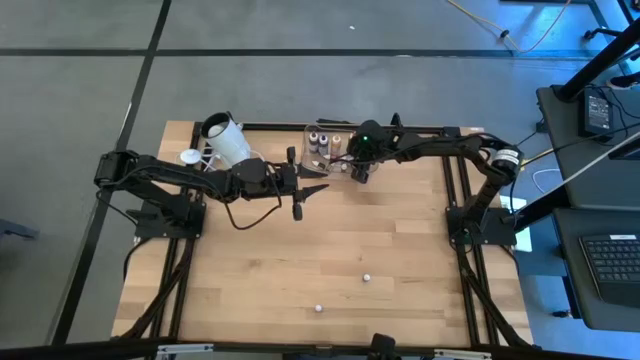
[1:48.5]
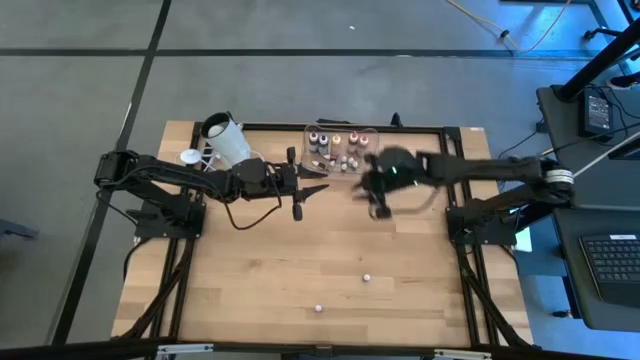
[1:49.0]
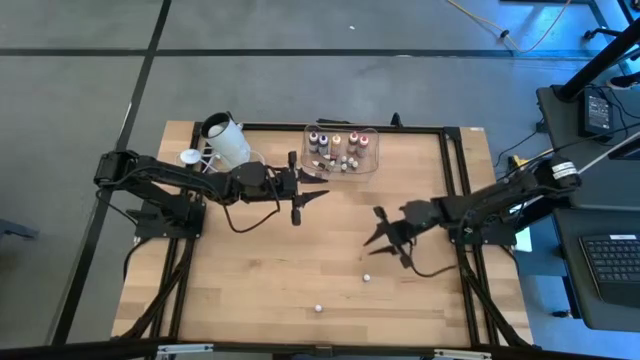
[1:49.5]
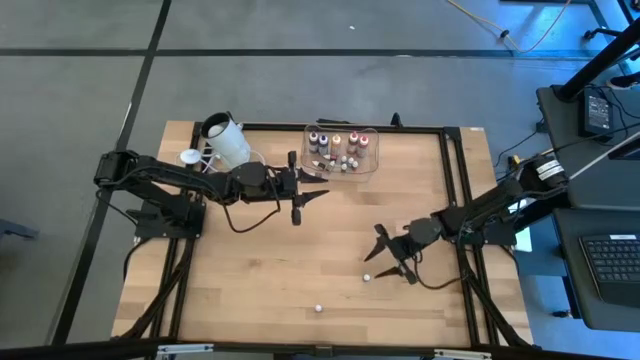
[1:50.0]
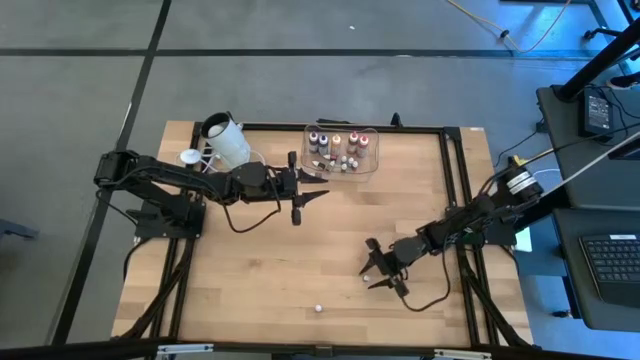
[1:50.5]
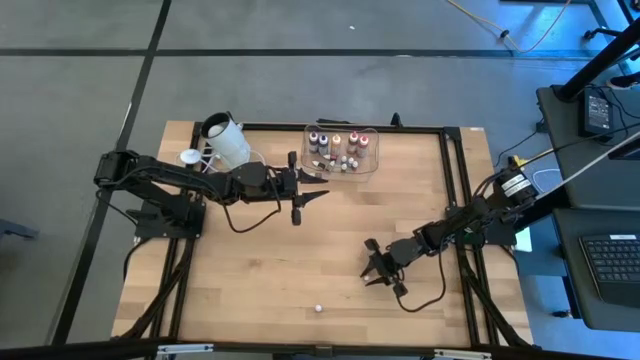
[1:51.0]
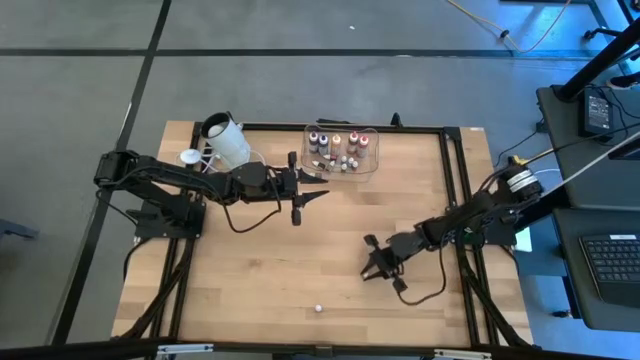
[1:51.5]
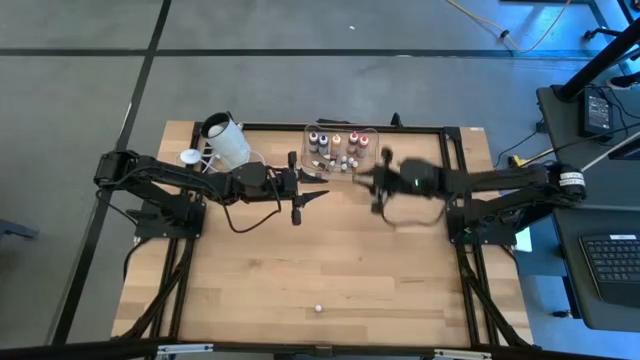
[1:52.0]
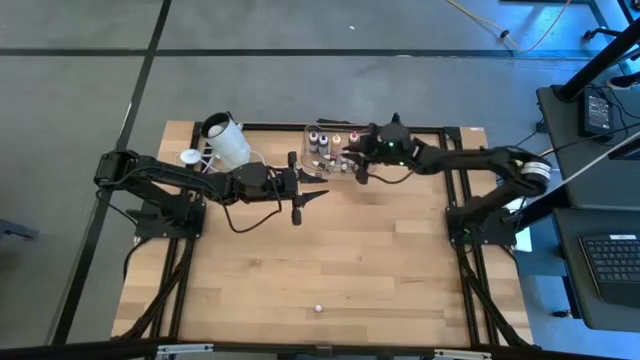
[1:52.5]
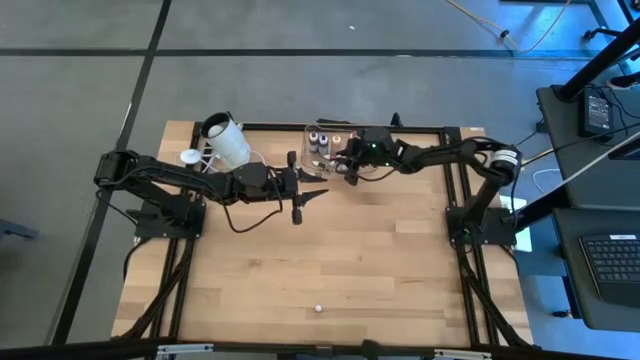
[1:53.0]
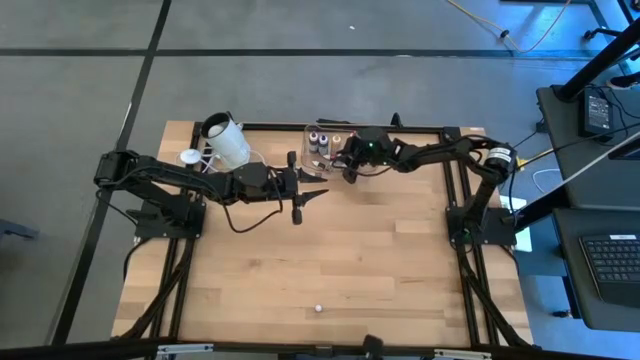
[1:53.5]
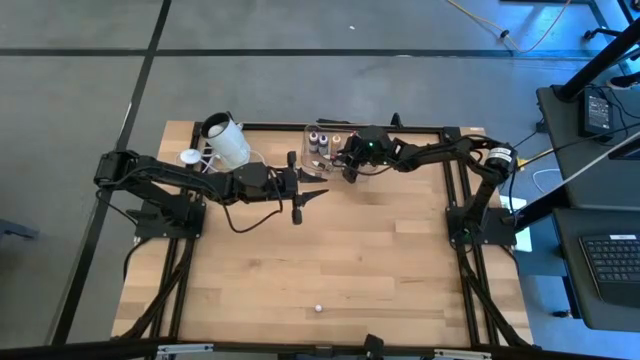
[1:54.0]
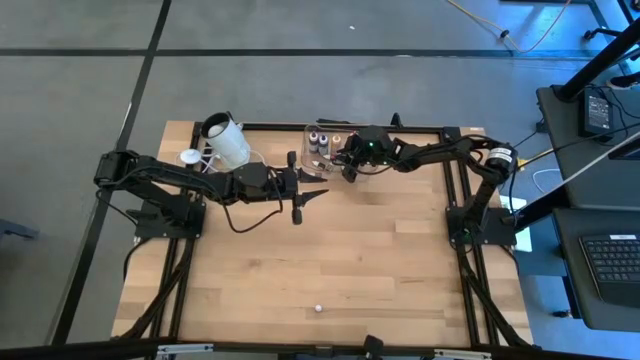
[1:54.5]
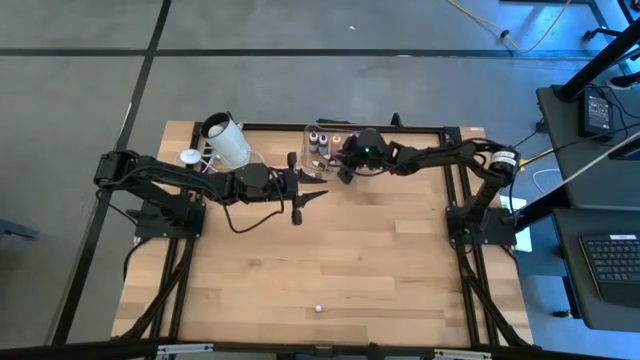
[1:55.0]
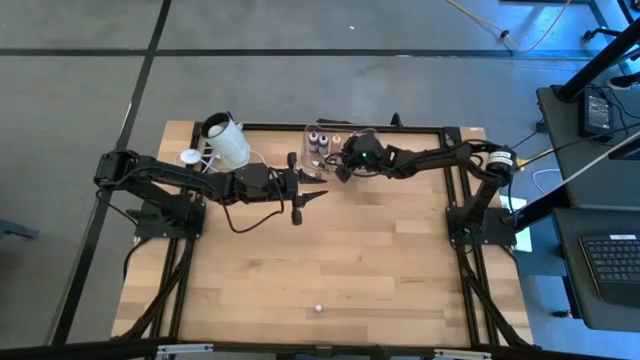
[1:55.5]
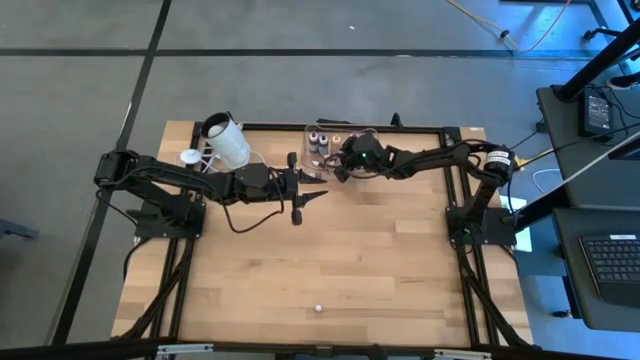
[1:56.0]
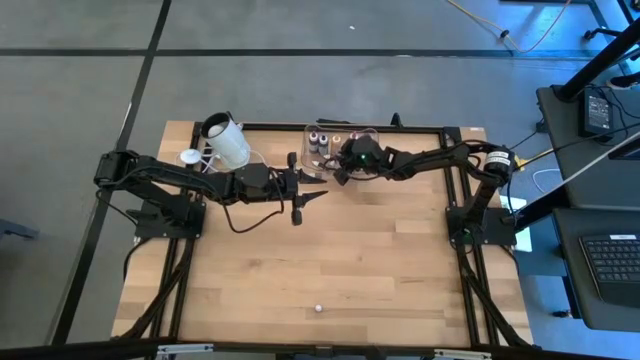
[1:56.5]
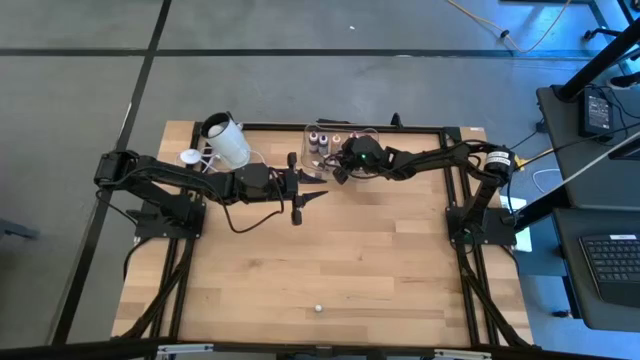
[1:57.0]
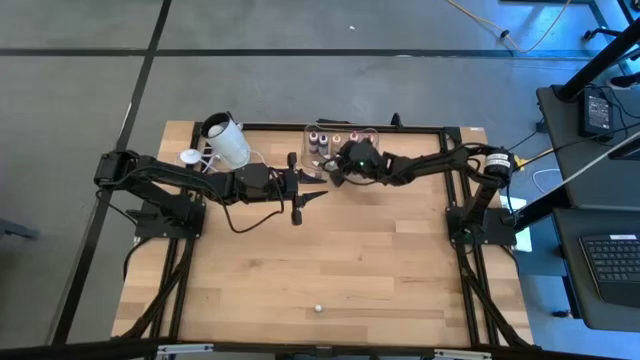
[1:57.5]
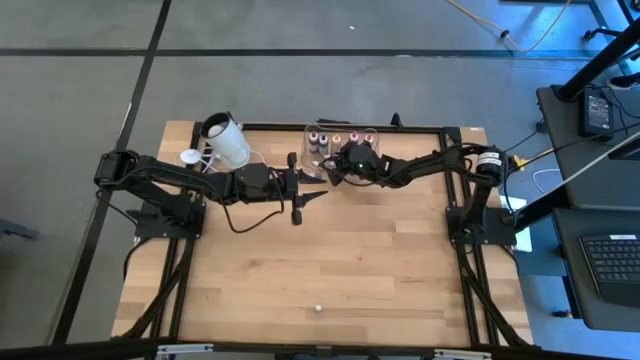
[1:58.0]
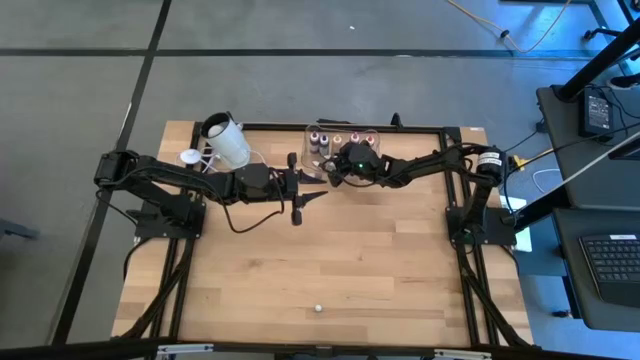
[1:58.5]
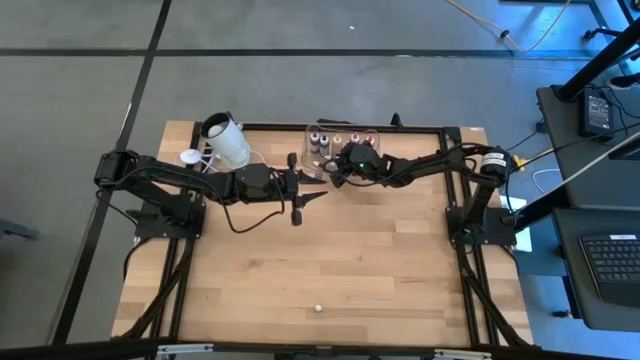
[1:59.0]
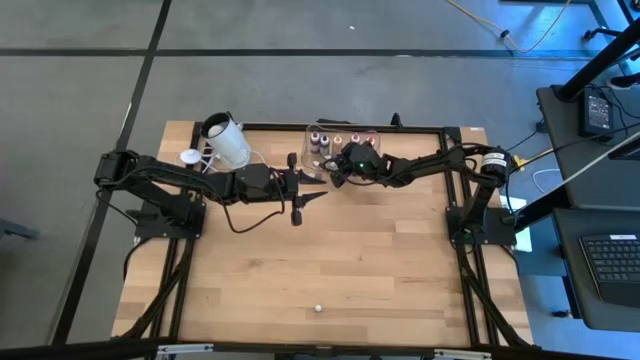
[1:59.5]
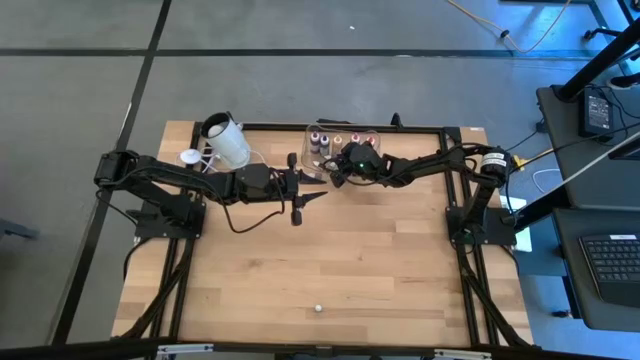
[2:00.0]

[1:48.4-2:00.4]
Task: Pick & Place food coloring
Put the small blue food coloring bottle into the transparent container

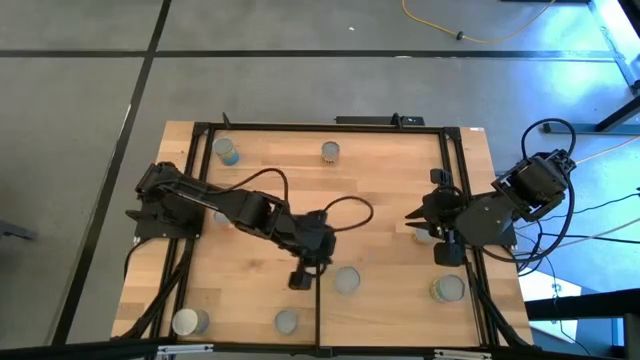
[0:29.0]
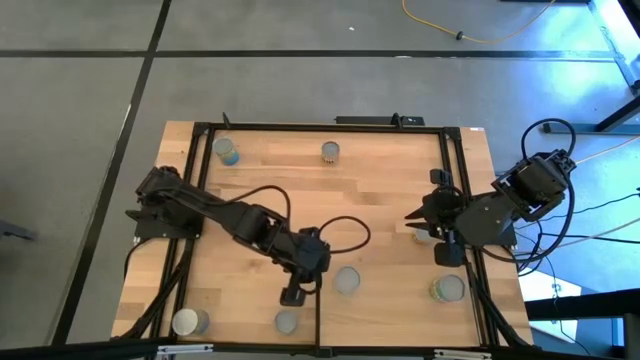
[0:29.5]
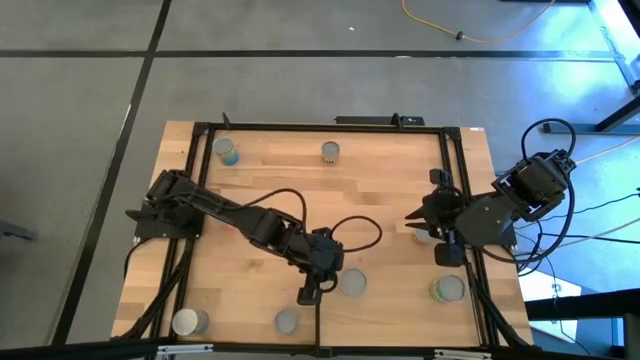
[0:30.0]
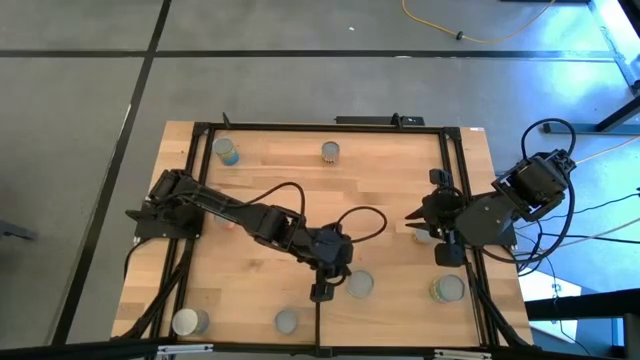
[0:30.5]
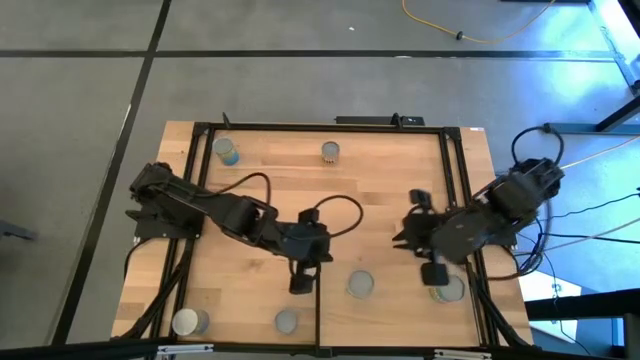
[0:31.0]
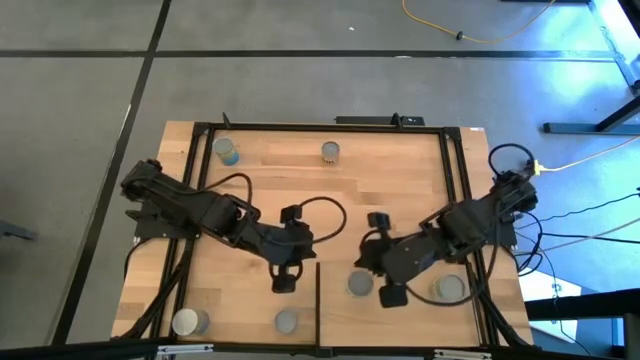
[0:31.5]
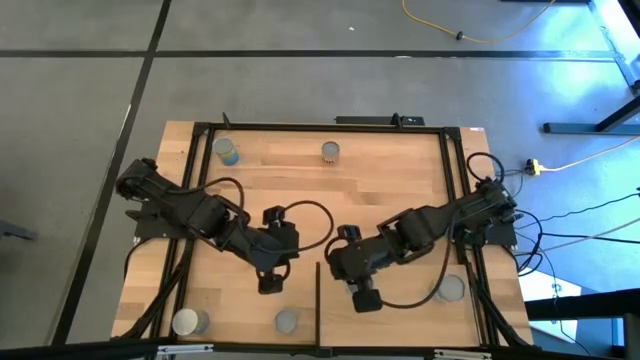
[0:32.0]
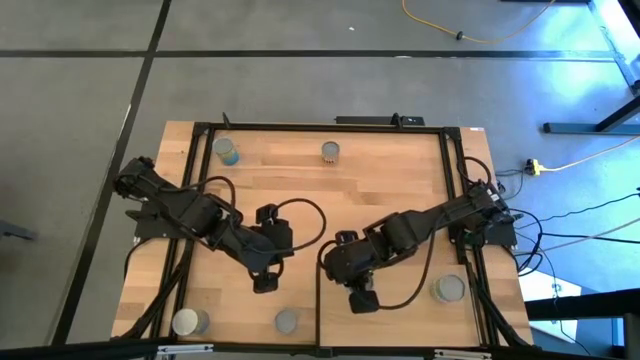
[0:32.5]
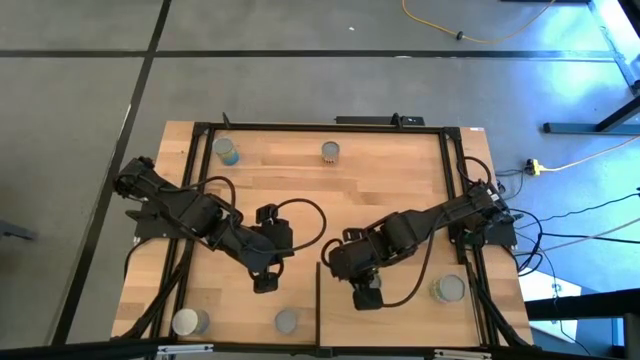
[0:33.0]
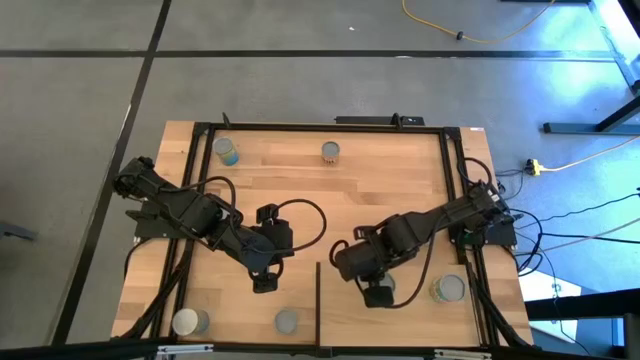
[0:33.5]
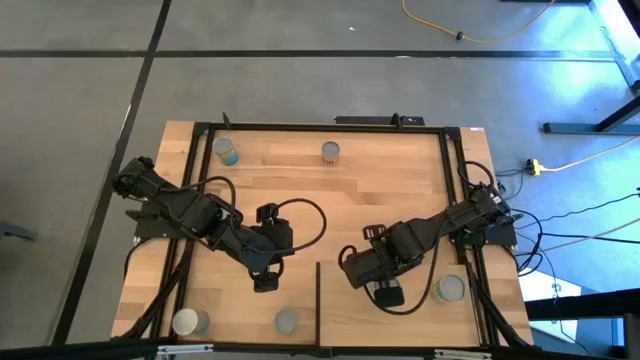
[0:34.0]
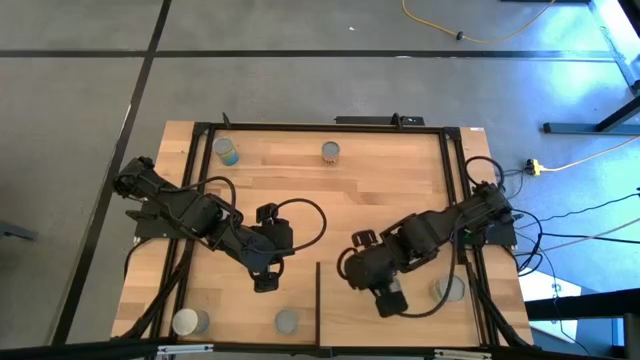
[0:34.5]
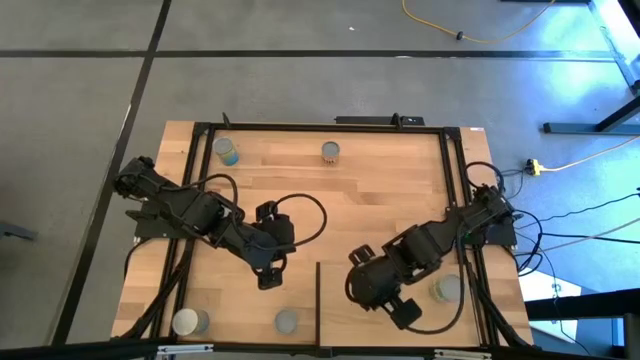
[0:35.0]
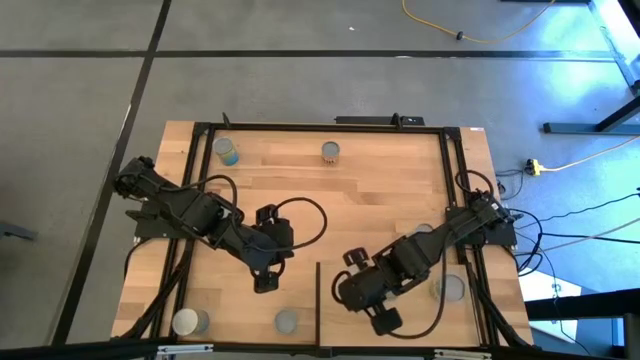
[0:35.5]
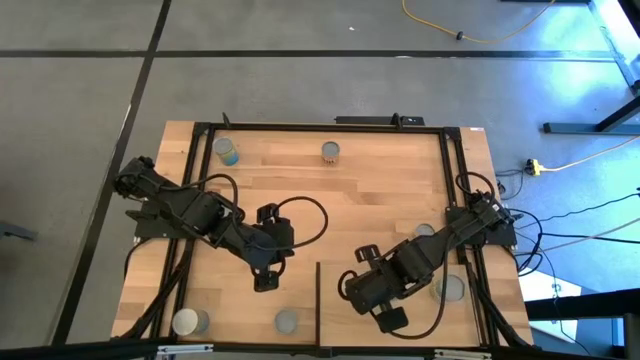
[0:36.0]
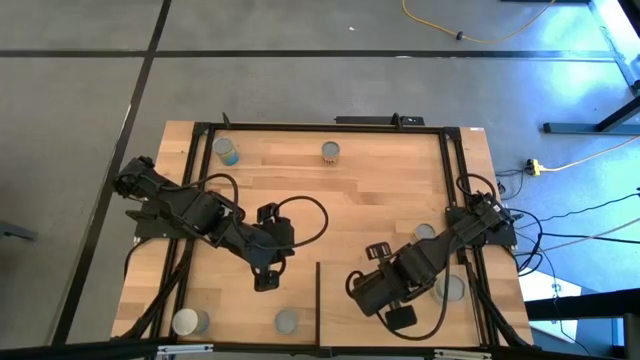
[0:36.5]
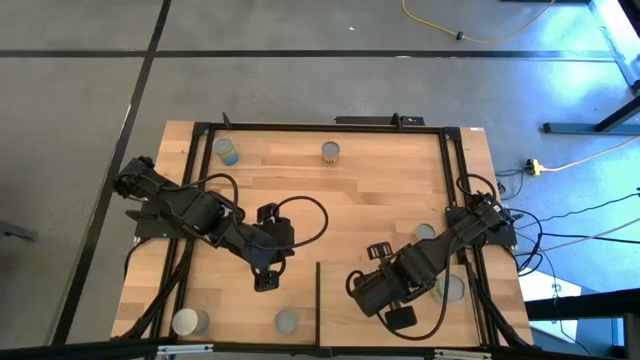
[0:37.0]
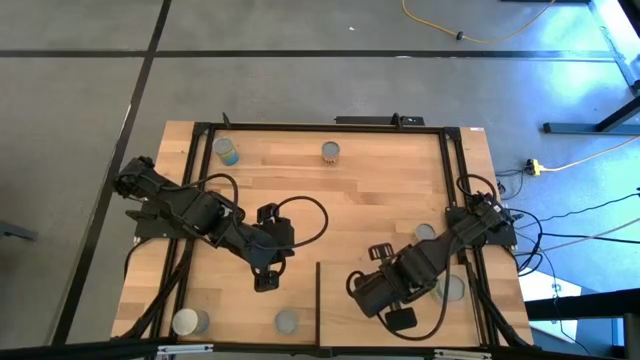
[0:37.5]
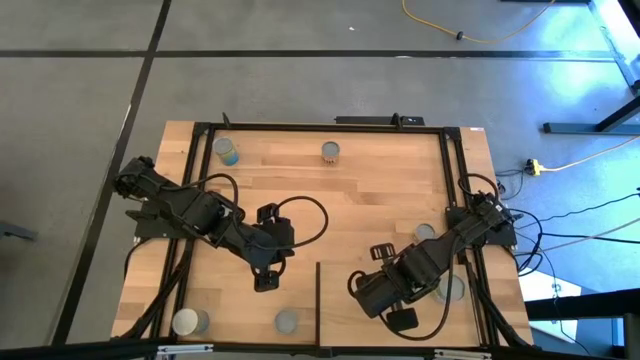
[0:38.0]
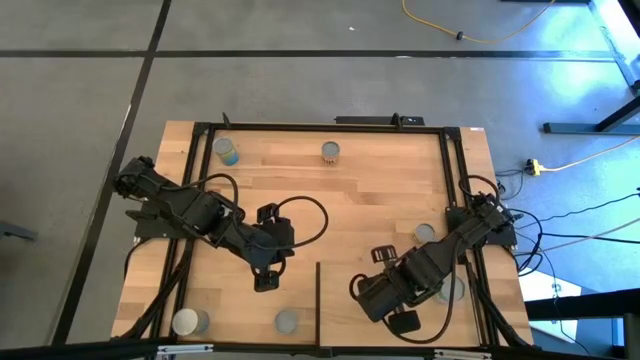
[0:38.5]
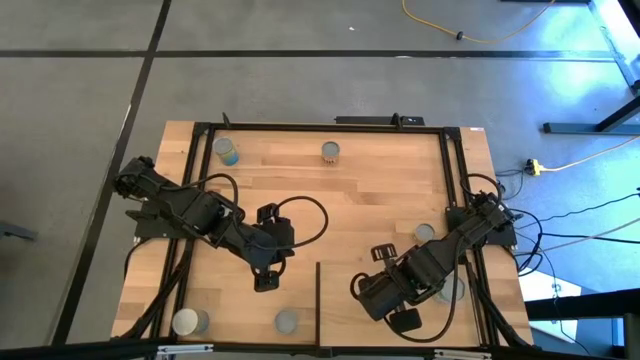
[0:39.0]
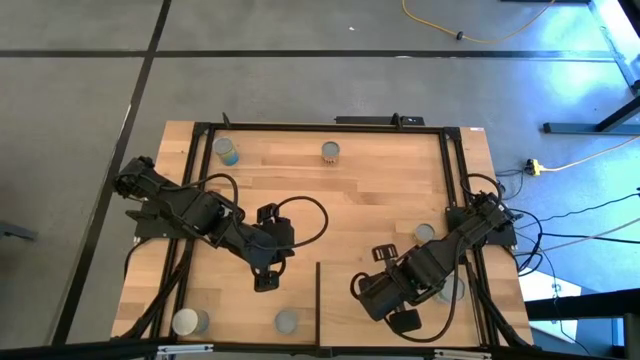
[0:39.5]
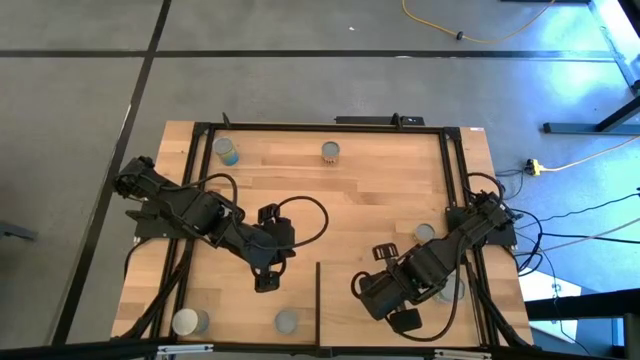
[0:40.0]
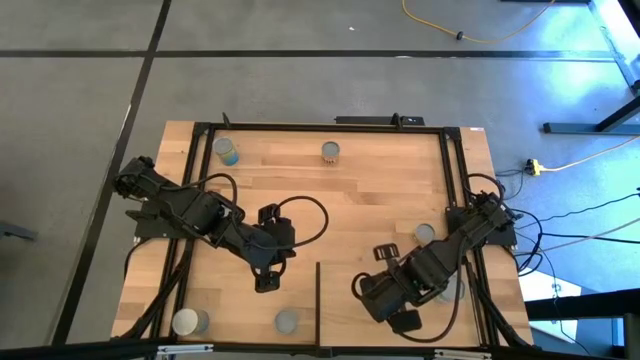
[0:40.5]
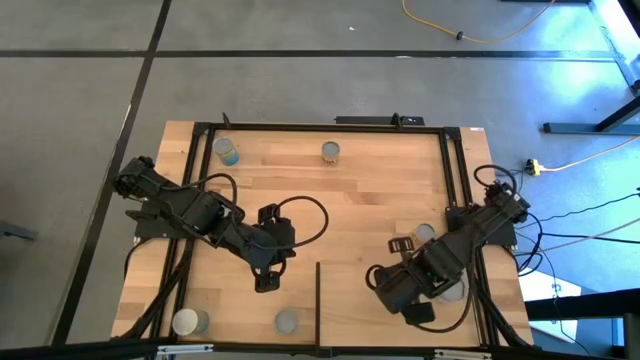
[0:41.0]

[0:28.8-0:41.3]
Task: Pick and place cans onto a shelf
Put the white canned mixed vegetables on the shelf
